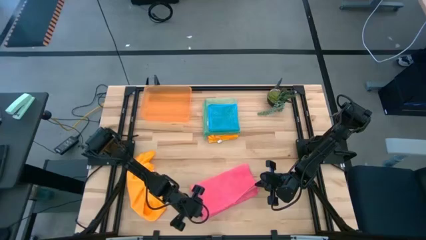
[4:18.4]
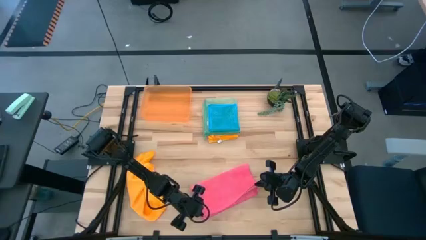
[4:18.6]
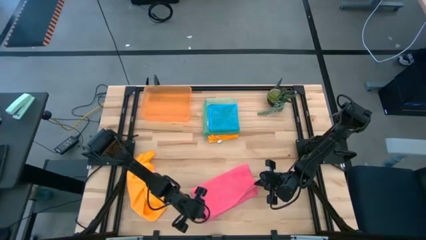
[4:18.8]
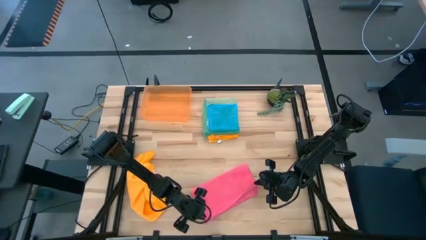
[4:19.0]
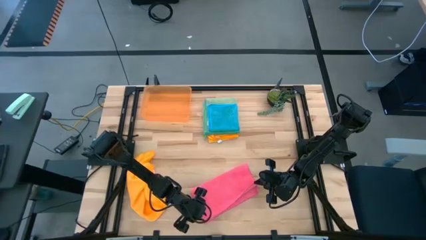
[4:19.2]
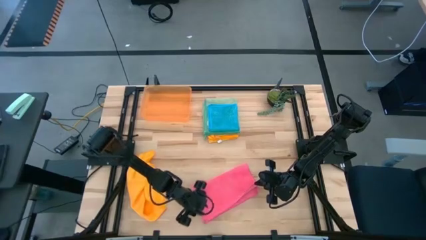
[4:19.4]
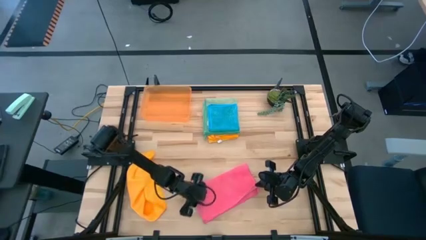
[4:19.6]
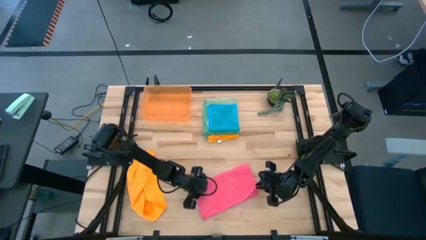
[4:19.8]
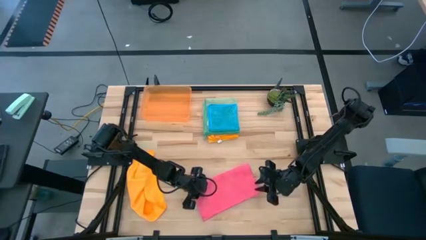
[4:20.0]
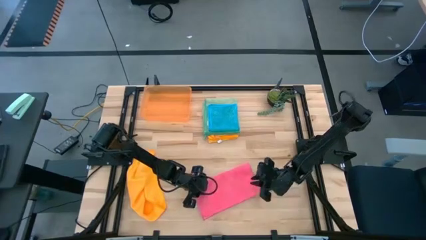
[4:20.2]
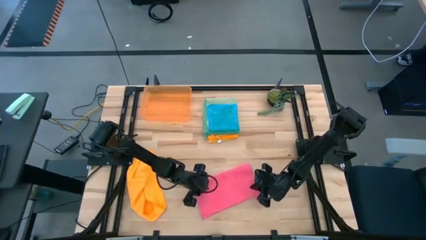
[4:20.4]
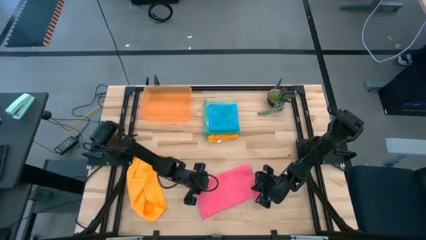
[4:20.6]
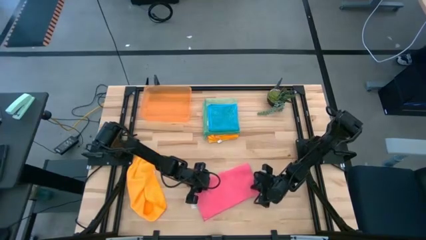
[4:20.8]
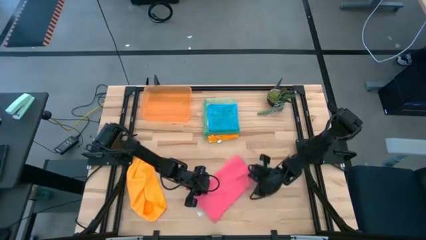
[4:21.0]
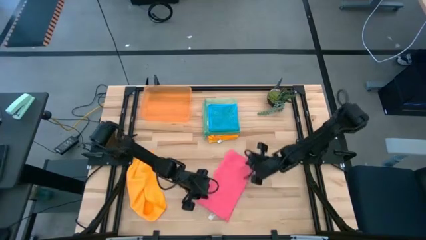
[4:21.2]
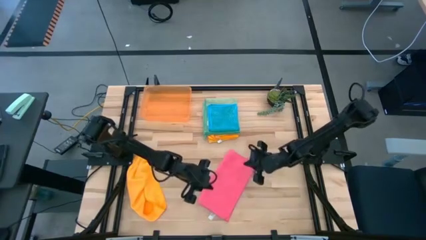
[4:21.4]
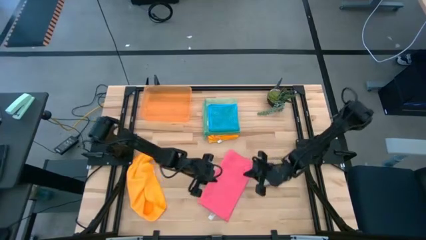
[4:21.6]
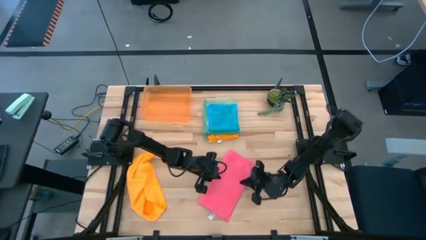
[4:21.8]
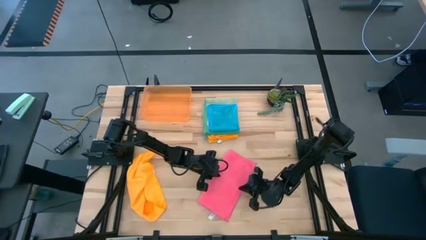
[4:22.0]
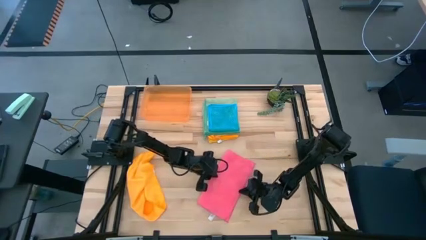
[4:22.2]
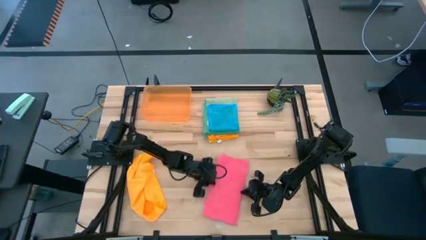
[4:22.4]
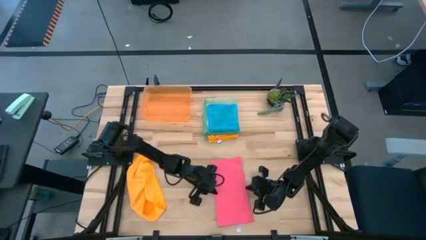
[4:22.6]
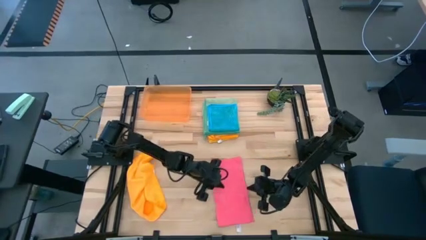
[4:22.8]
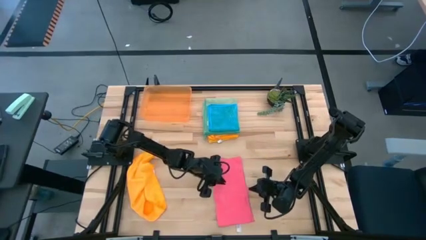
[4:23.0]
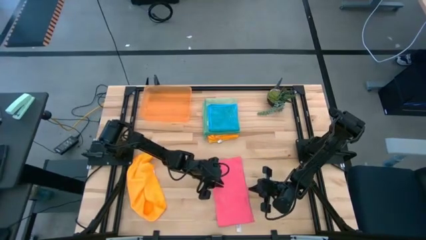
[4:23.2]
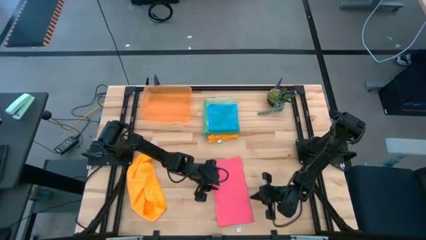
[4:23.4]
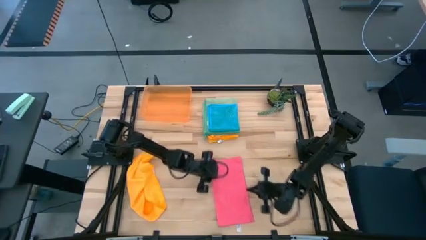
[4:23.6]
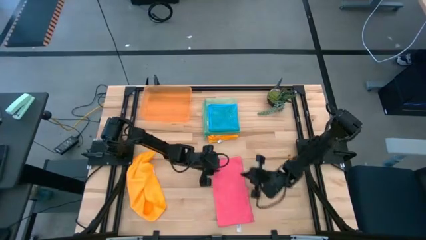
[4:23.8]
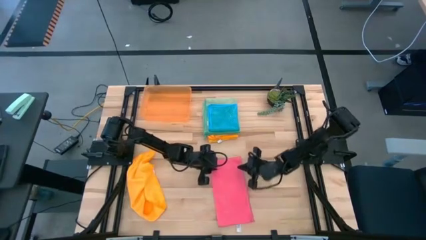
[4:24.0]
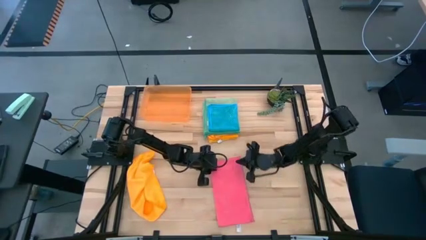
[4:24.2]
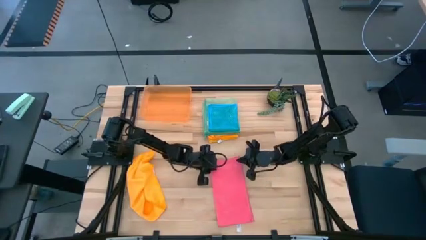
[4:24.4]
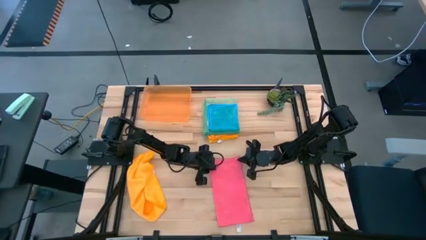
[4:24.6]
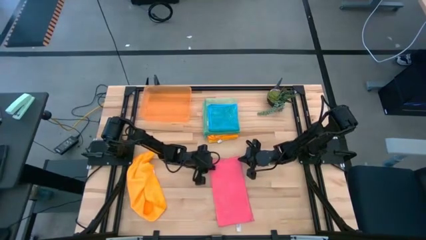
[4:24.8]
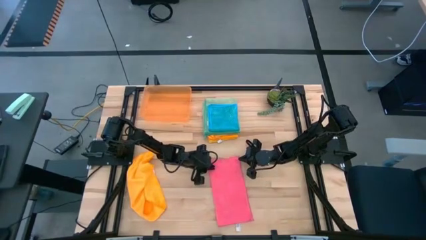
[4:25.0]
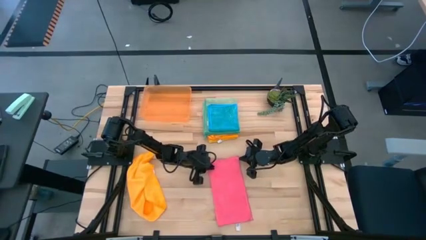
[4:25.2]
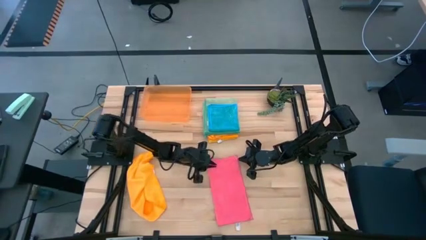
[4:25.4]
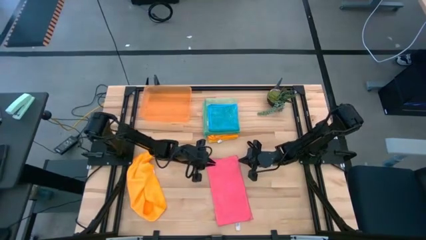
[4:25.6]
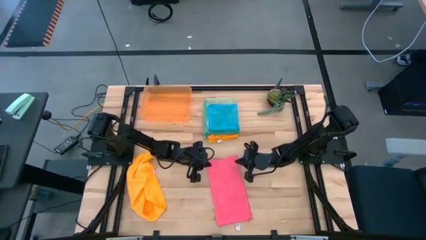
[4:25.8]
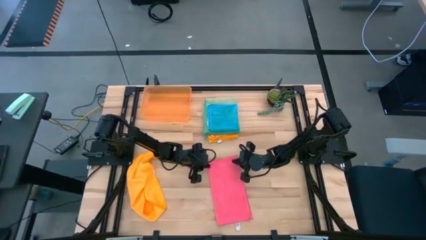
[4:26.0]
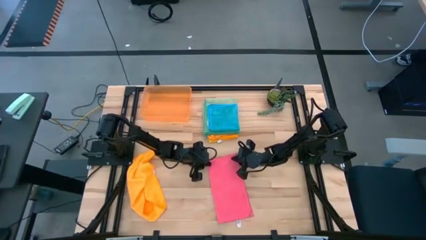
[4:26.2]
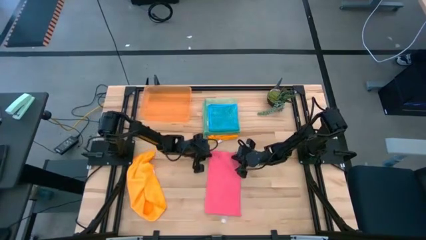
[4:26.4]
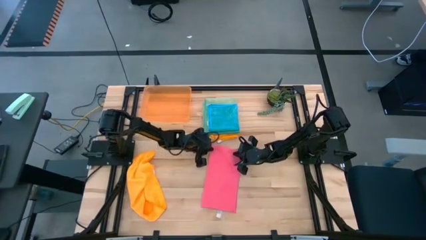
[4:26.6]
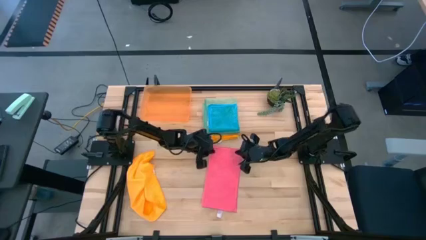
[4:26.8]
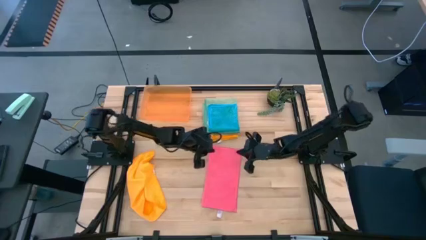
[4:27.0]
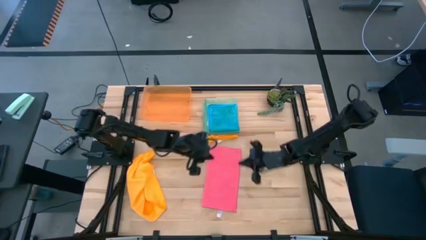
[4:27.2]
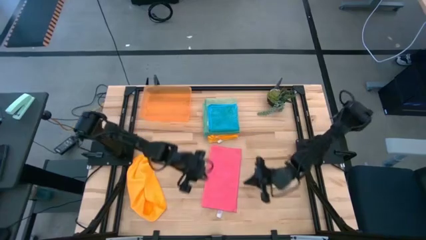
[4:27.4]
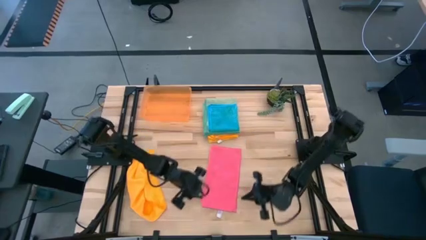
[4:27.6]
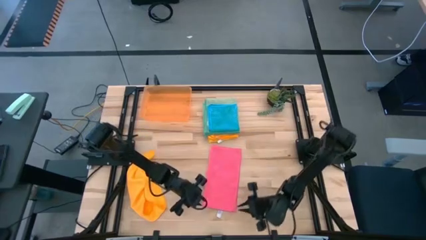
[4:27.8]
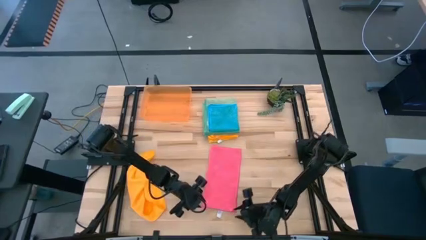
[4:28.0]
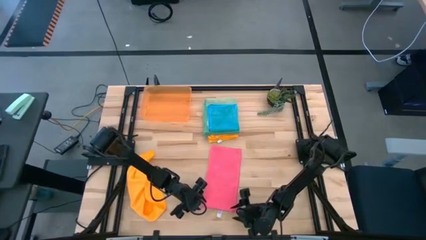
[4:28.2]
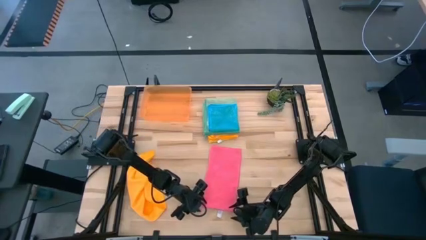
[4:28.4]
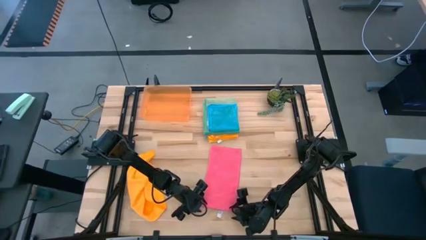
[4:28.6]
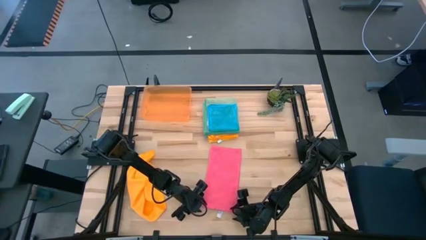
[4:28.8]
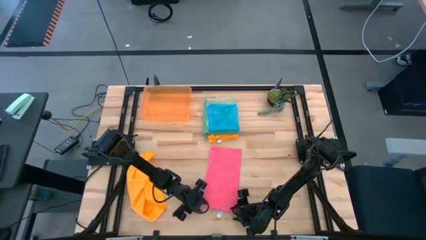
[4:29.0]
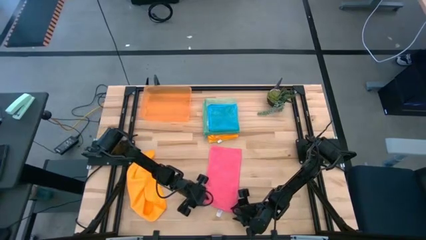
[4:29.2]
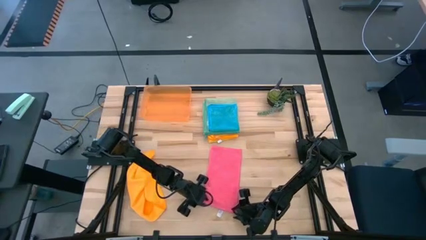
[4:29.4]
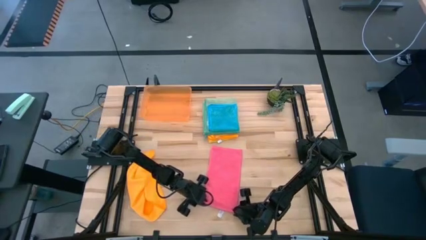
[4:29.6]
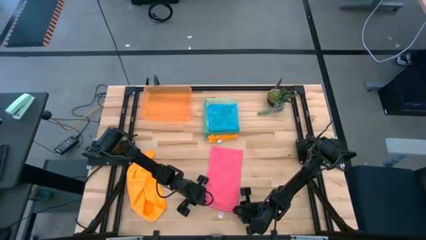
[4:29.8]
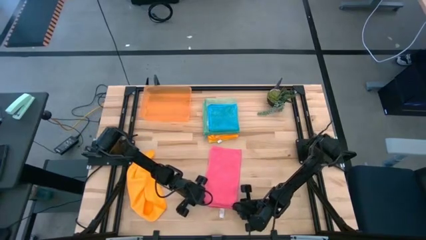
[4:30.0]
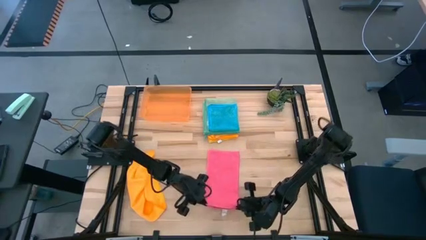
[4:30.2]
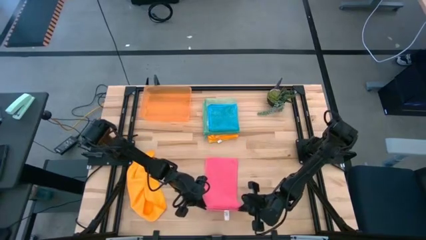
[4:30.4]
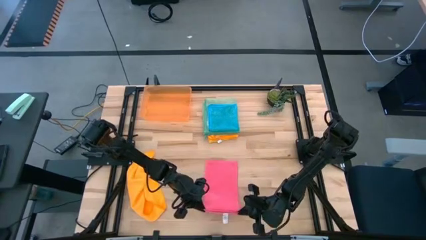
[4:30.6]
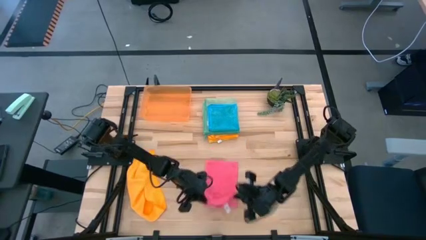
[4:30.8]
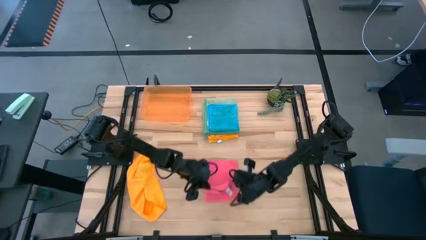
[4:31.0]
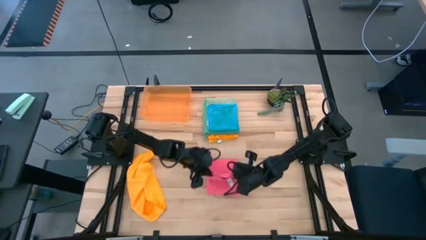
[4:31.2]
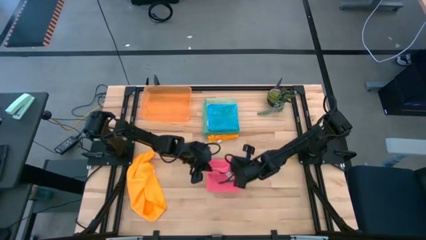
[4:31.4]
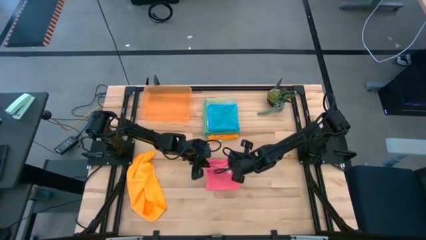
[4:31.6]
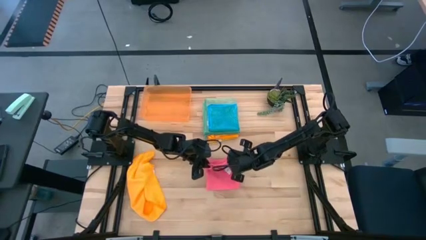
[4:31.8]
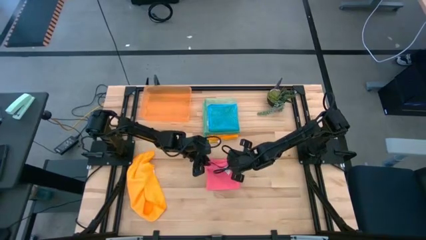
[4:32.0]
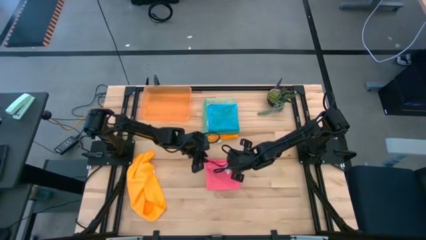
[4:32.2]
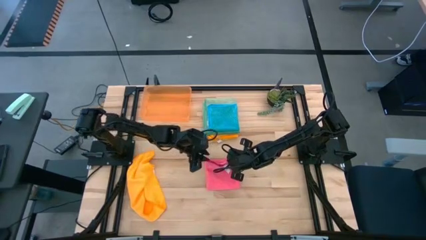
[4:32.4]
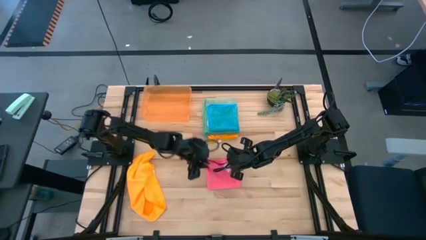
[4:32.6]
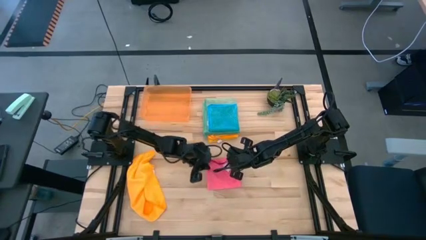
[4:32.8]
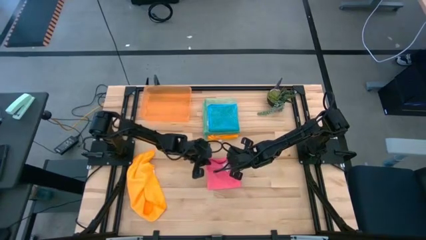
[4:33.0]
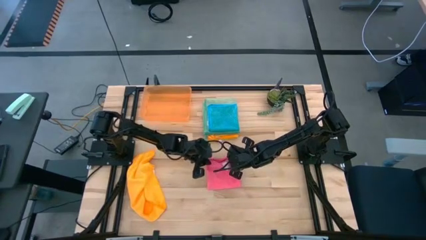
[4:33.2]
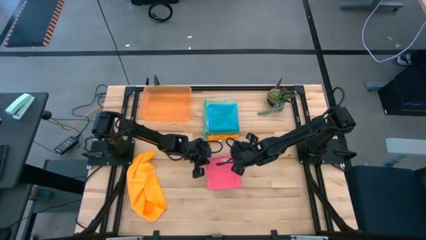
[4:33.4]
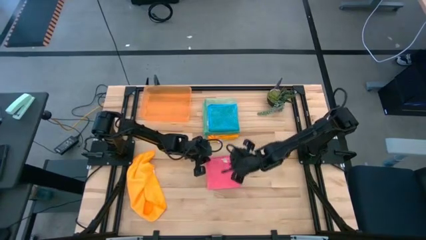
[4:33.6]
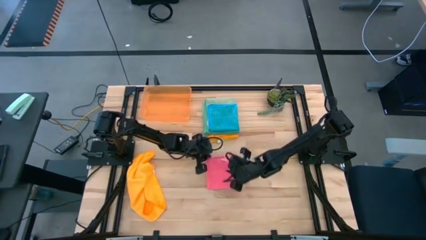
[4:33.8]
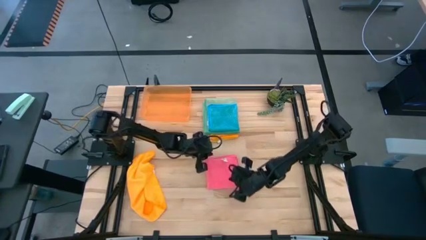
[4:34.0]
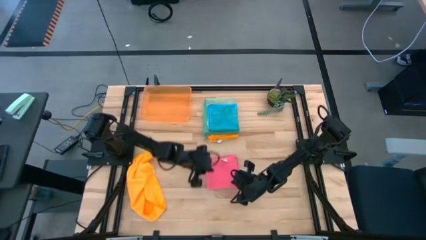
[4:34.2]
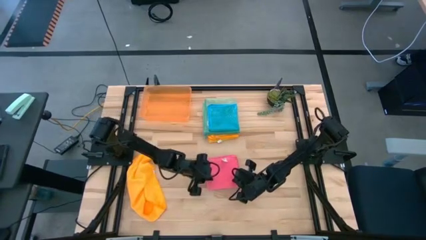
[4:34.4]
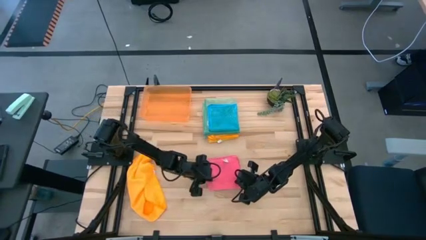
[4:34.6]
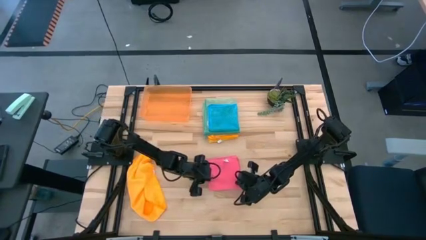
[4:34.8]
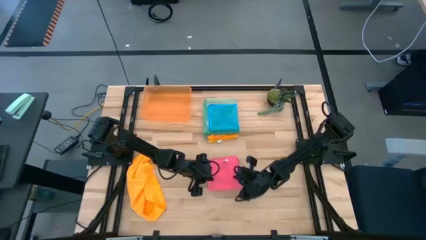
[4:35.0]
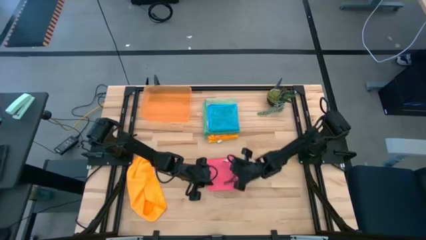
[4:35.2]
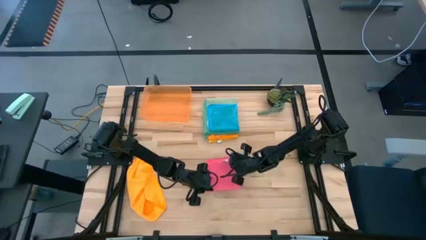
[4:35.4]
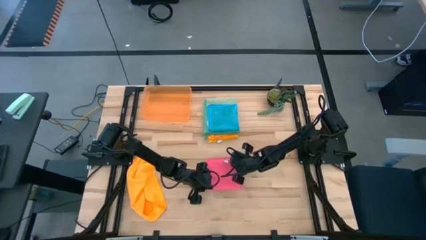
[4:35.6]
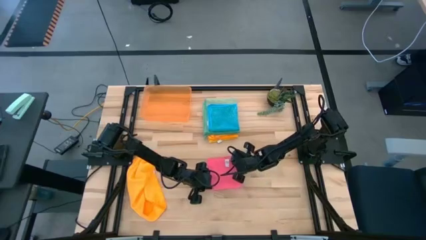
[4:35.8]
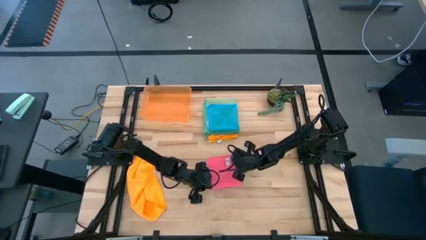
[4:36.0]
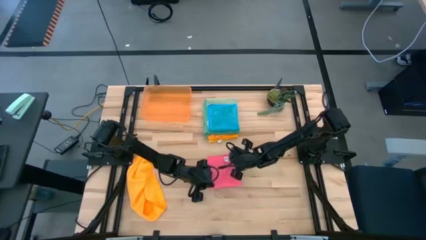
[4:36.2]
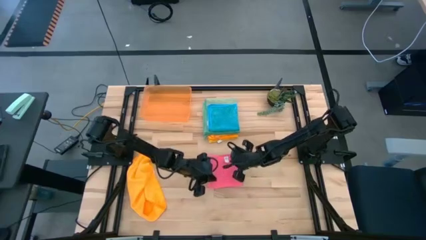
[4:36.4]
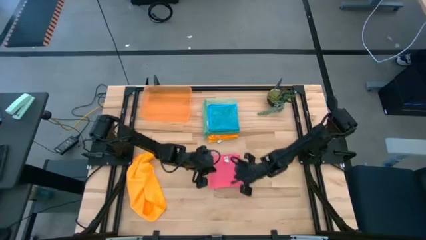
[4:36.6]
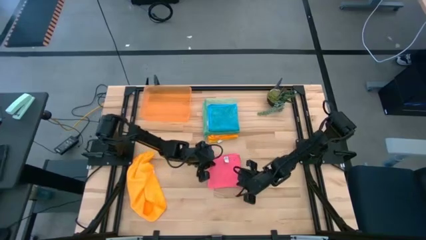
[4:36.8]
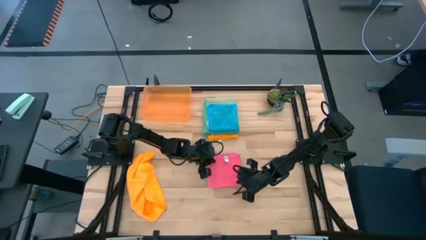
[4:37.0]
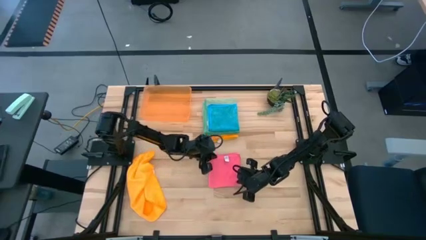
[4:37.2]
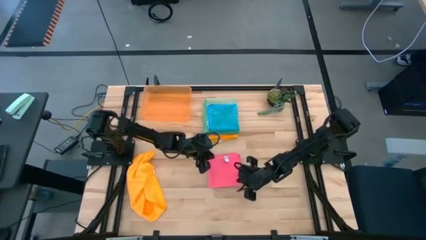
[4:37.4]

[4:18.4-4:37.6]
Task: Fold microfiber towels
Fold the pink towel
